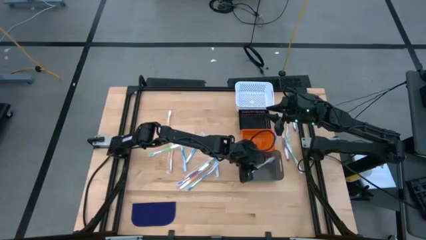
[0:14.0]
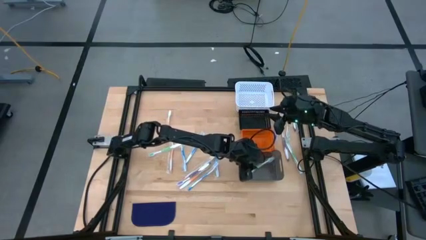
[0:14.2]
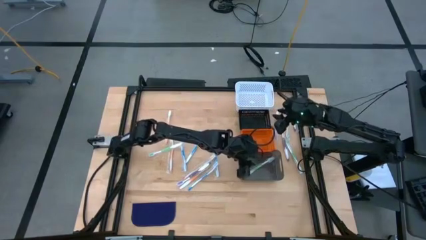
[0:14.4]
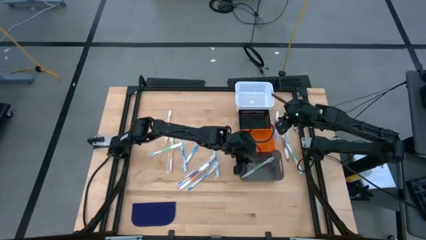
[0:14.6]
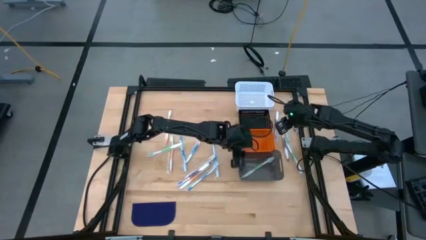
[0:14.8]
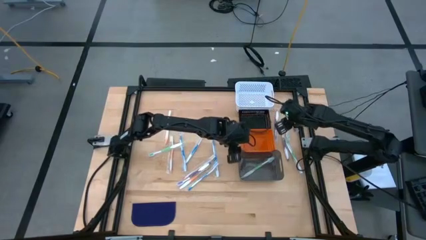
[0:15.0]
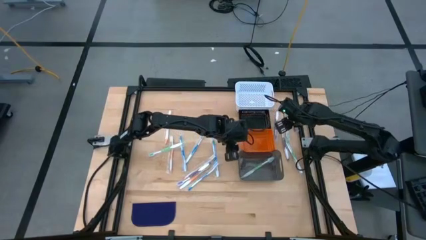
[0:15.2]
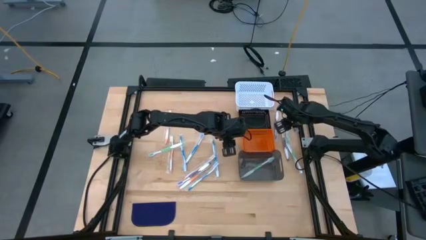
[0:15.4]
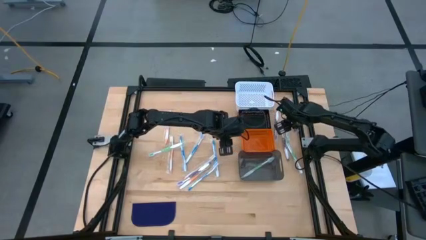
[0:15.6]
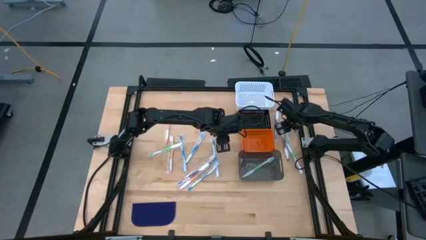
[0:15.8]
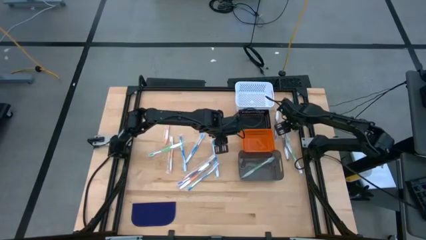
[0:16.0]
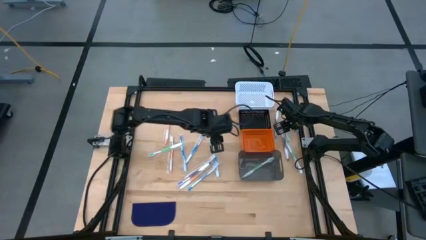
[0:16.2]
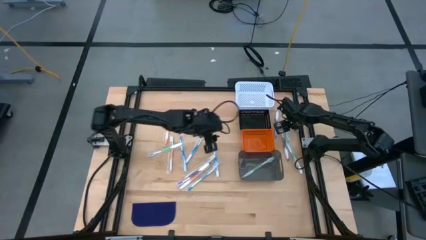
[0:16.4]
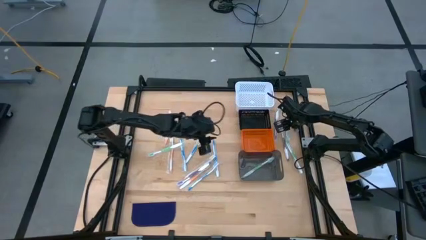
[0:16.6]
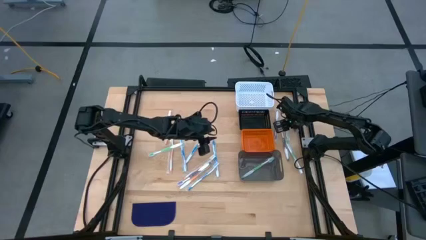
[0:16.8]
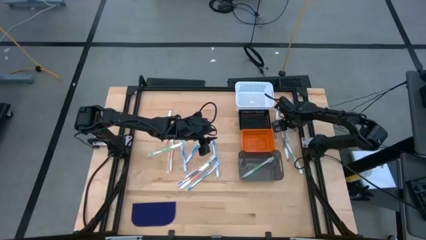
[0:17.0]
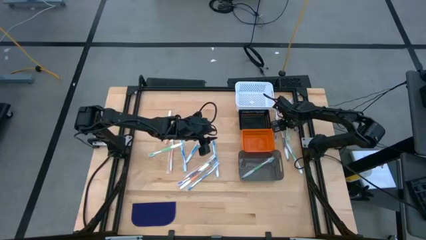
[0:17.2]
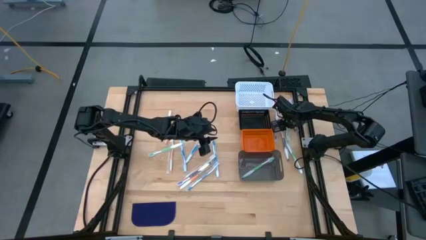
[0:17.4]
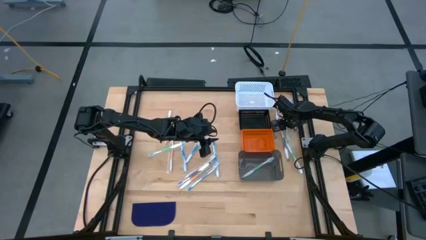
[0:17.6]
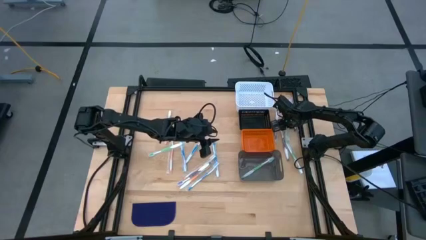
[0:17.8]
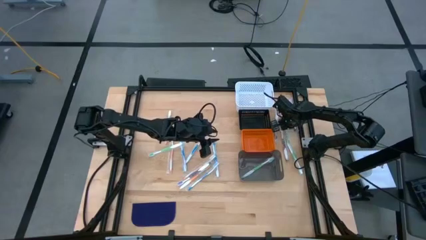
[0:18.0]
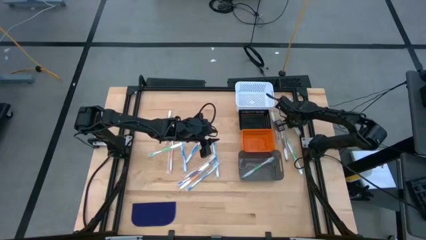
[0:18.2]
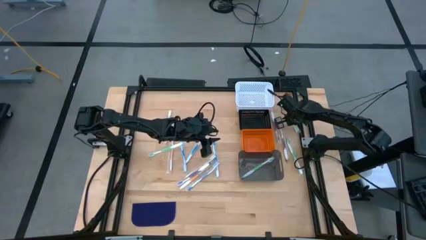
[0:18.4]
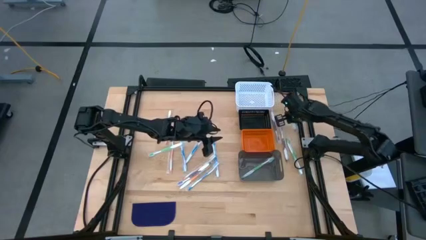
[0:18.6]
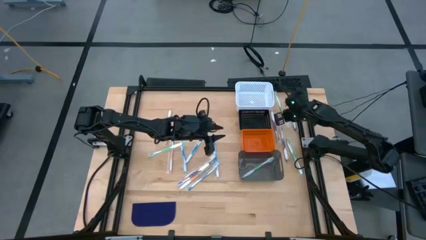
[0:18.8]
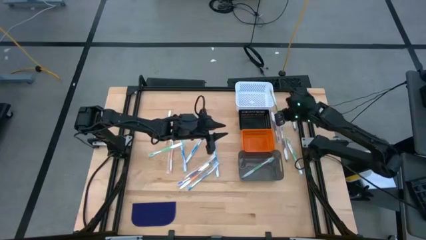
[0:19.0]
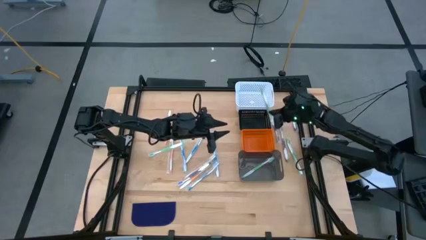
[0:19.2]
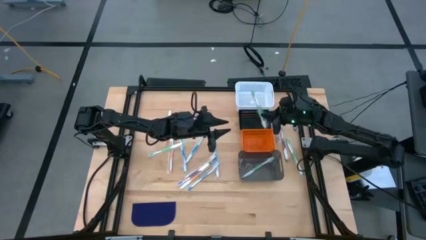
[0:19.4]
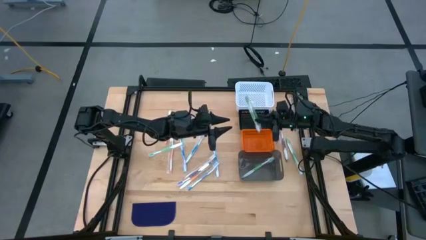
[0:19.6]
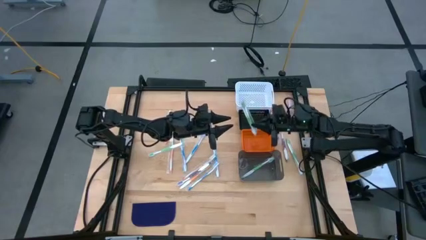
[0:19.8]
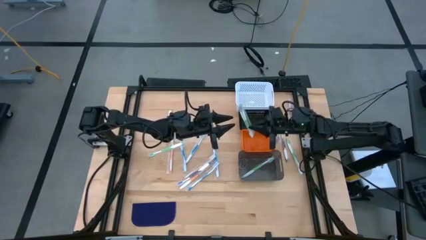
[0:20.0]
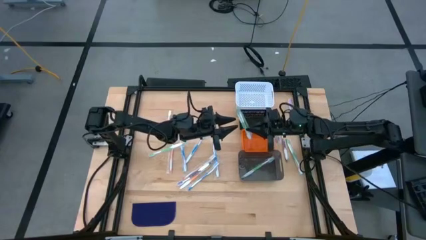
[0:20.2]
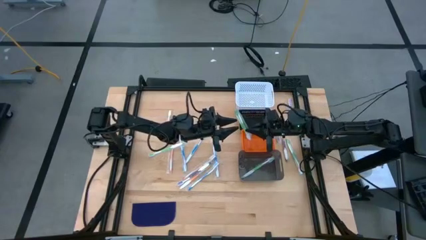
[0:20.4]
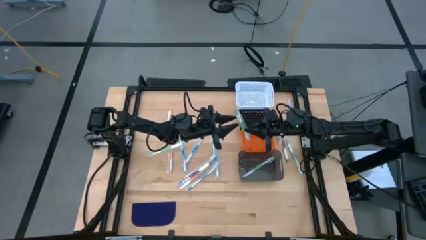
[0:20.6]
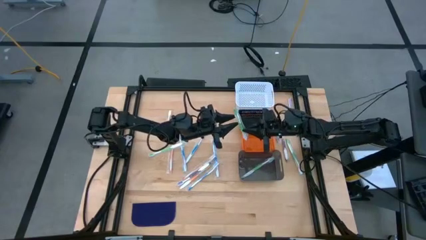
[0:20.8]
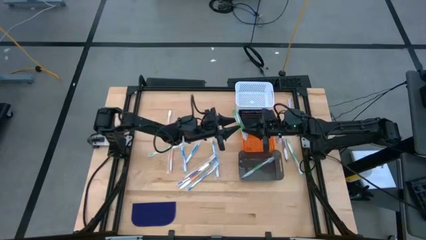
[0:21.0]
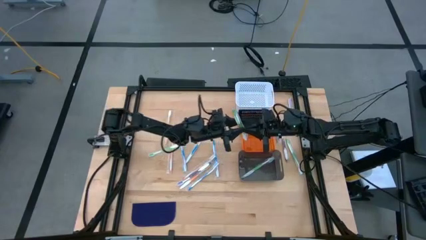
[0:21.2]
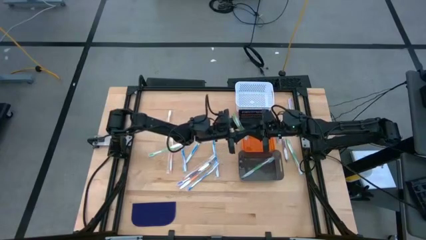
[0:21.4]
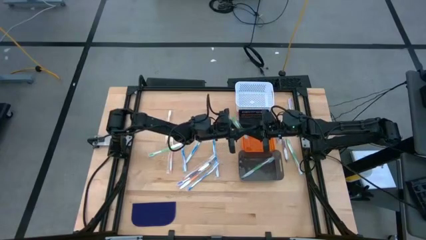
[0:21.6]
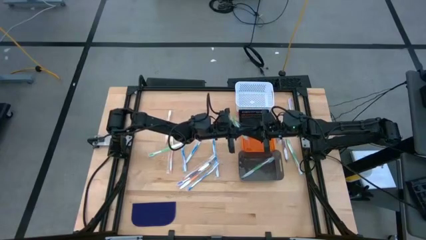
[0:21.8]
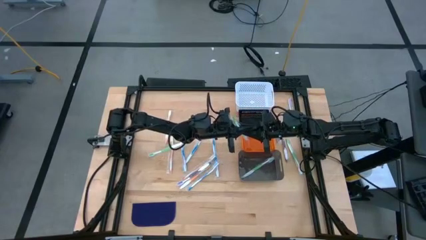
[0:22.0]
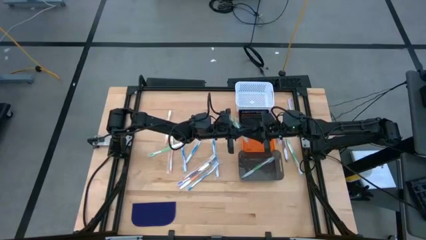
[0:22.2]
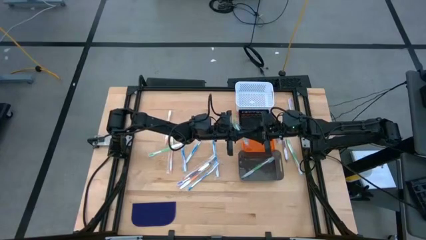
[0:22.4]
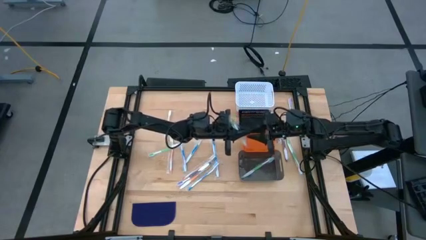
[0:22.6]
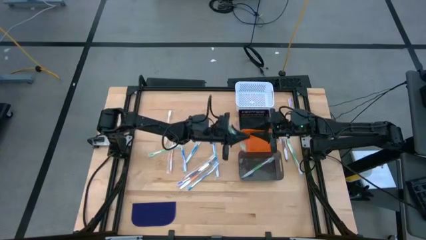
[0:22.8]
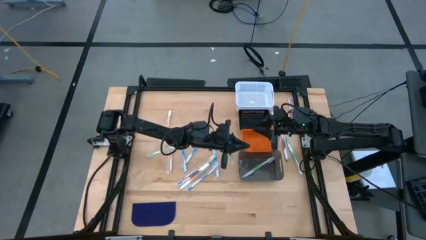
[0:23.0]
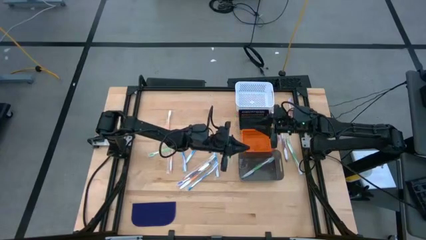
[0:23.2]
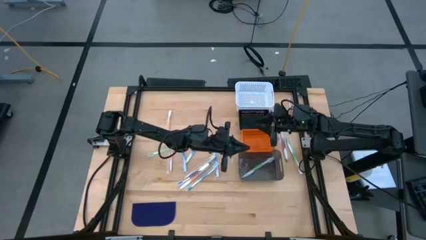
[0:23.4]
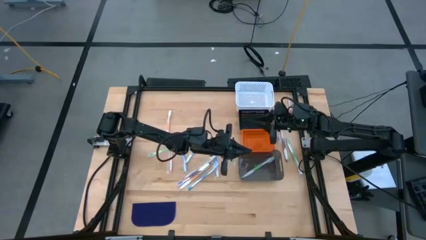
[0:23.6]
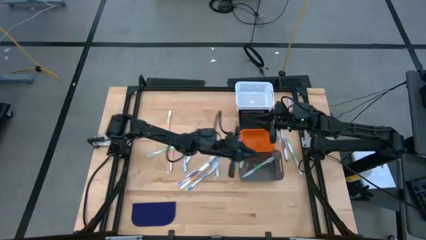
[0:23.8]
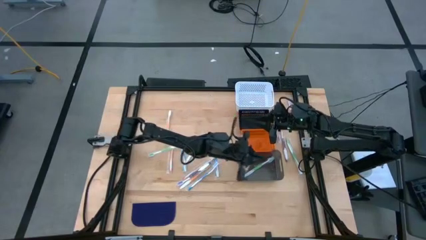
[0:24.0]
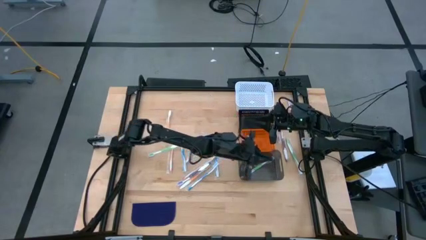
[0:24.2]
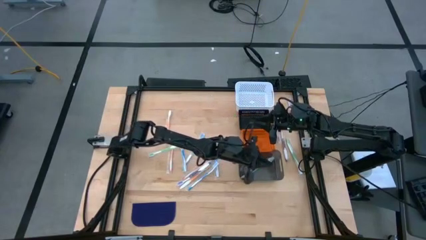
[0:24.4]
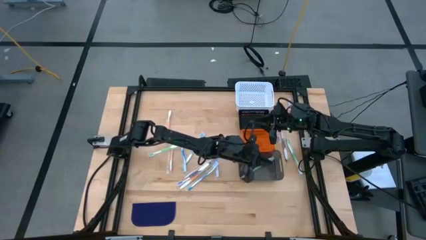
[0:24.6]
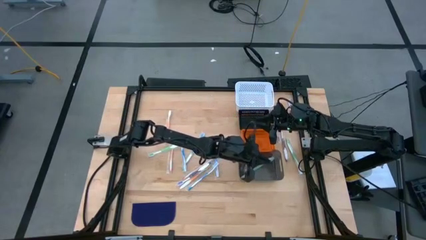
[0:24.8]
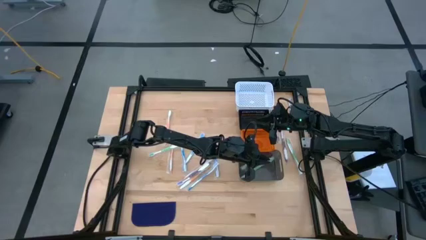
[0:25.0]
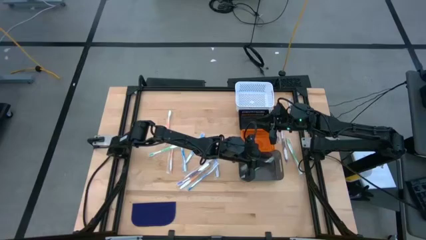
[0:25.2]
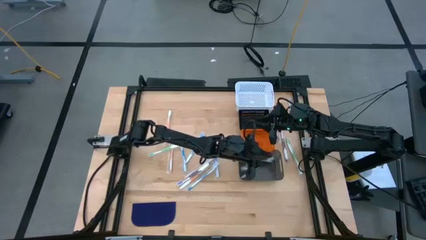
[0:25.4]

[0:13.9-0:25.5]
Task: Pick & Place Toothbrushes
Put the green toothbrush into the gray bin

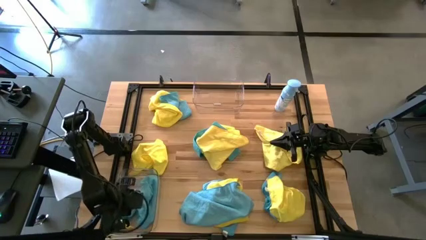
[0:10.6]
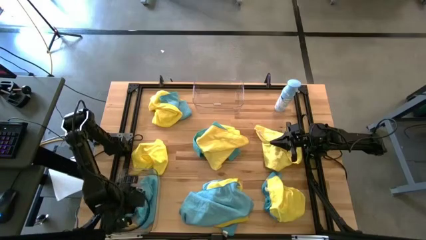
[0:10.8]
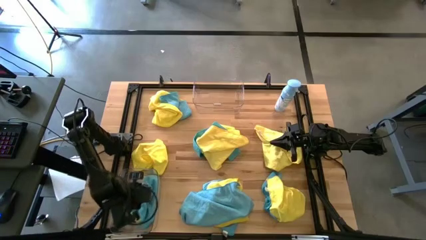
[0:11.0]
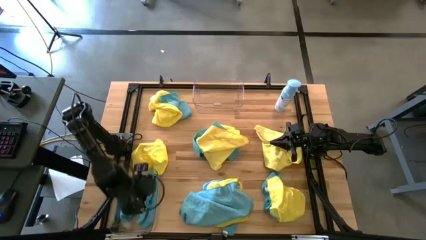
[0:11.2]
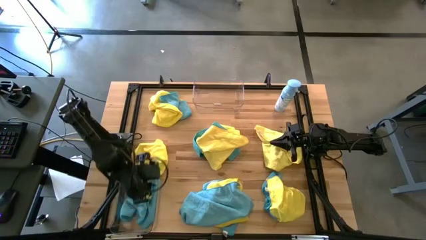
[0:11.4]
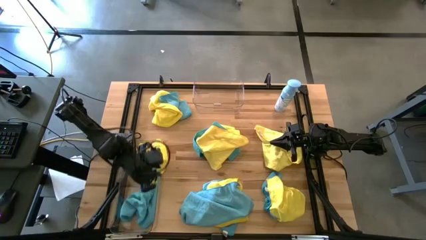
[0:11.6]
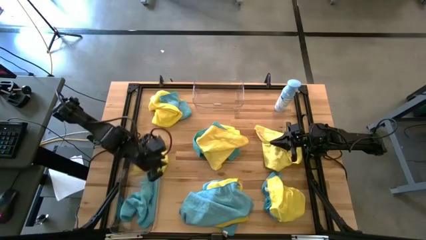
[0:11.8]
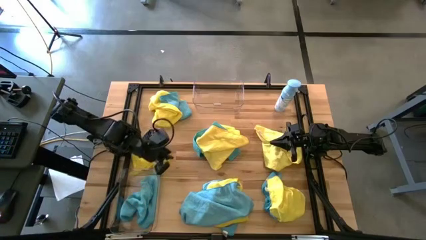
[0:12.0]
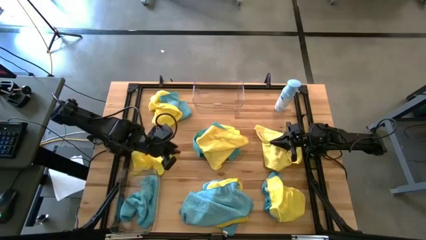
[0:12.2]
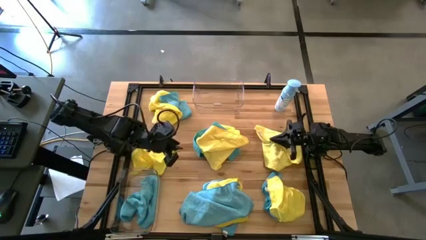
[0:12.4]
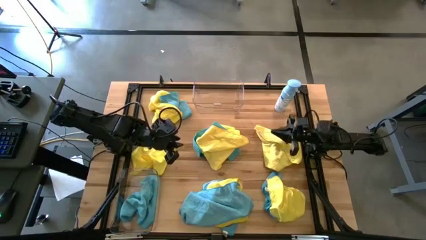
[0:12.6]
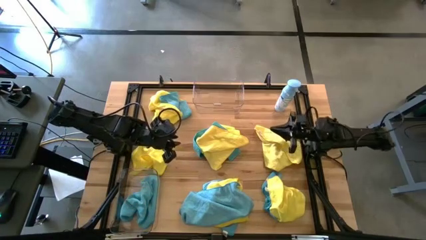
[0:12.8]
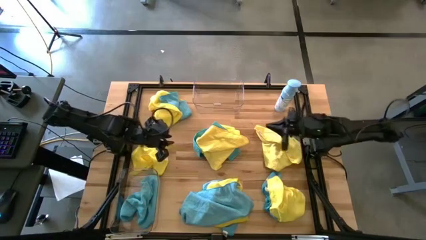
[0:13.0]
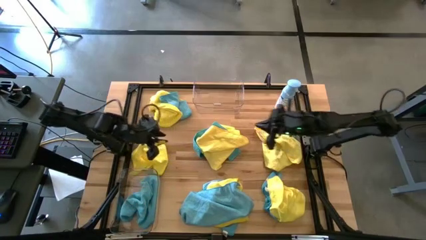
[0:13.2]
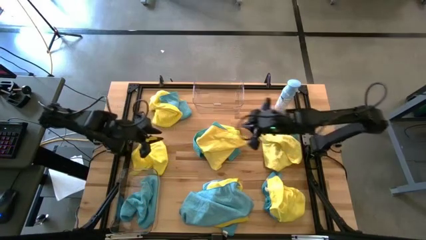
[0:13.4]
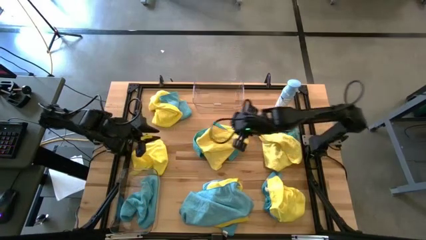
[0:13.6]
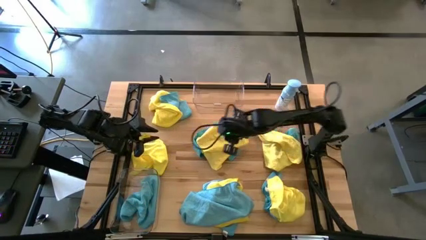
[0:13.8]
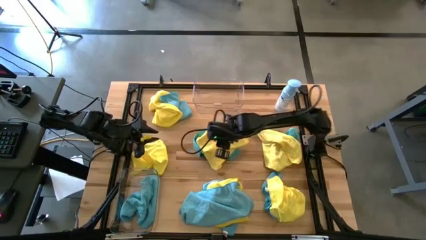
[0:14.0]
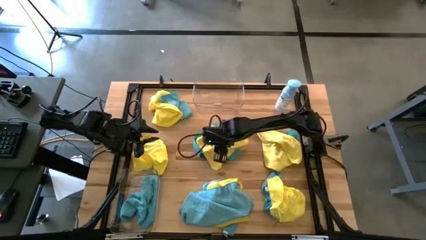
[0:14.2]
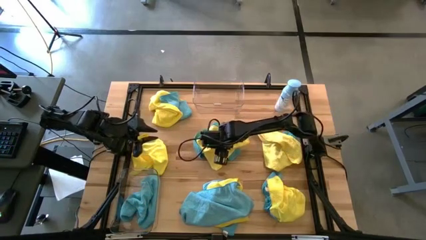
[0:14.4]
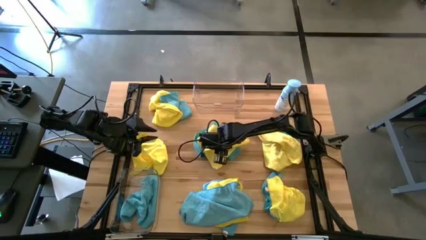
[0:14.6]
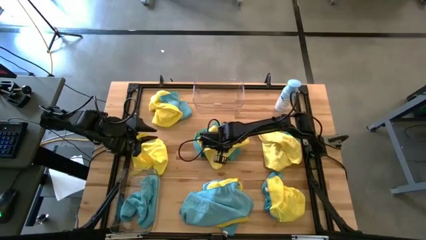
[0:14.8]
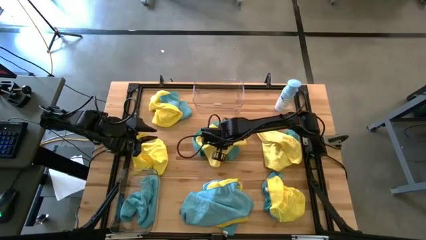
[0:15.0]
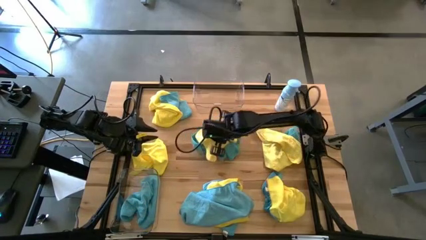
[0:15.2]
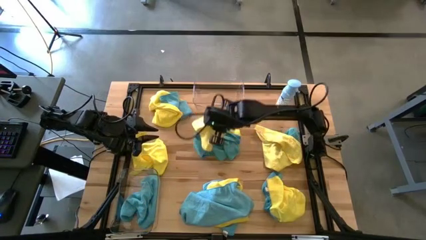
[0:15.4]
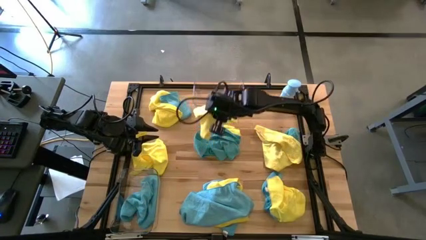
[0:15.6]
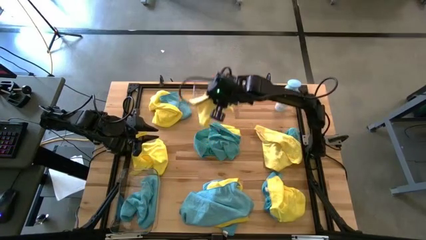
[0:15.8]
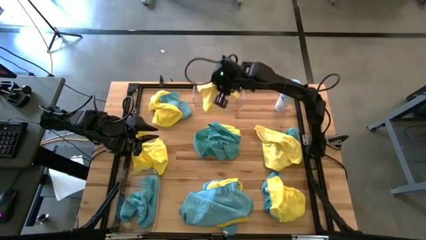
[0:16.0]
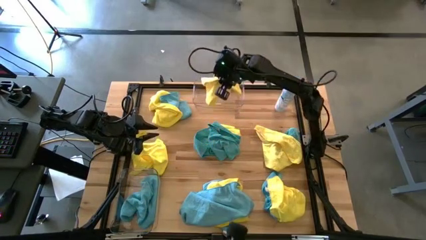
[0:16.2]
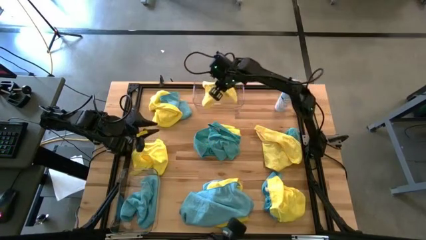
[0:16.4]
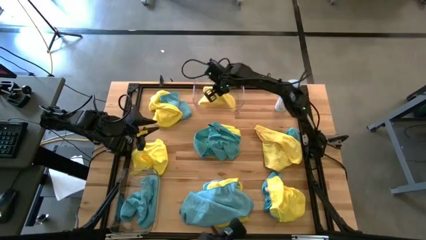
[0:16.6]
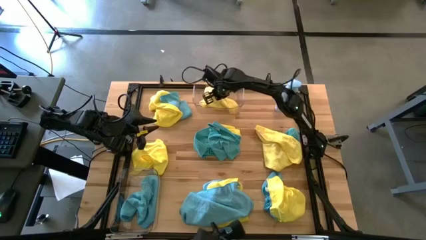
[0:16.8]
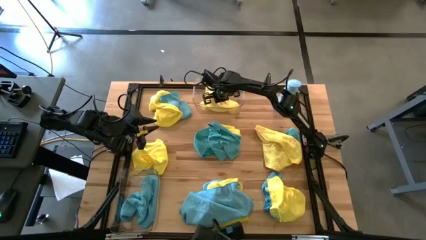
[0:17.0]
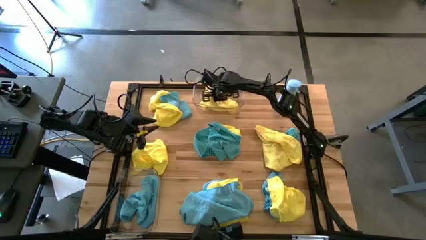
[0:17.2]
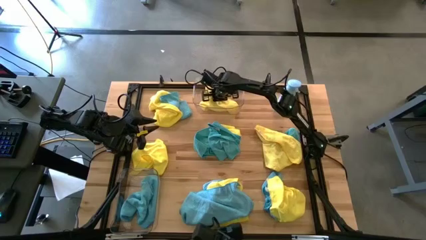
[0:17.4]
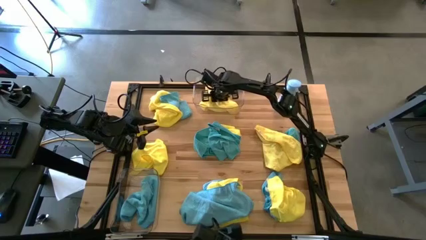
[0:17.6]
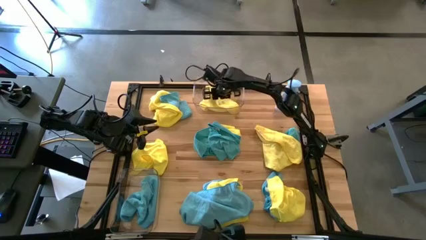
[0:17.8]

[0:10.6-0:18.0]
Task: Sort microfiber towel by color & place in baskets
Put the yellow microfiber towel into the top transparent bin
